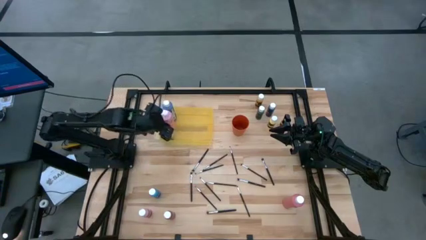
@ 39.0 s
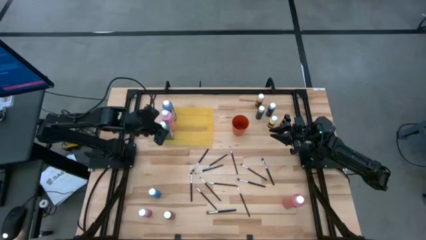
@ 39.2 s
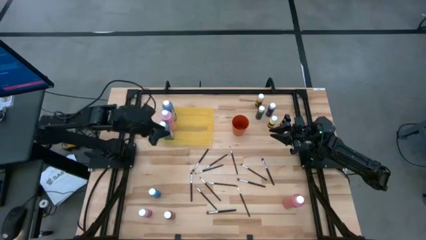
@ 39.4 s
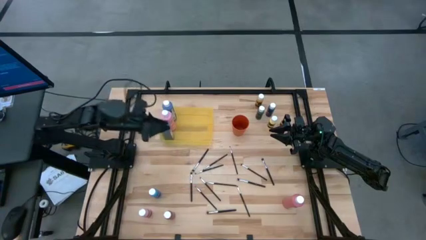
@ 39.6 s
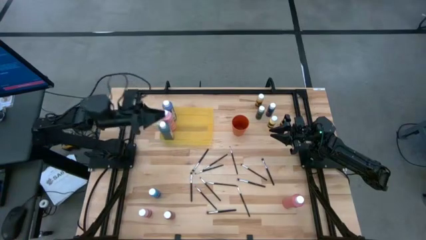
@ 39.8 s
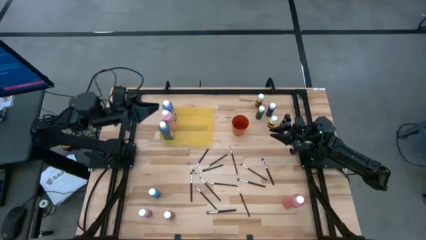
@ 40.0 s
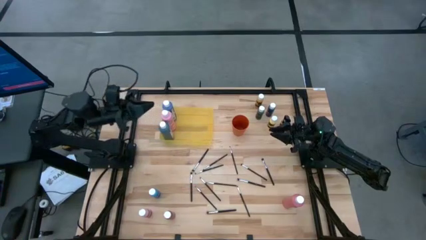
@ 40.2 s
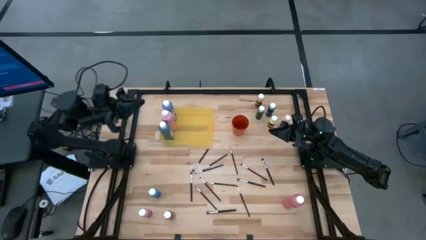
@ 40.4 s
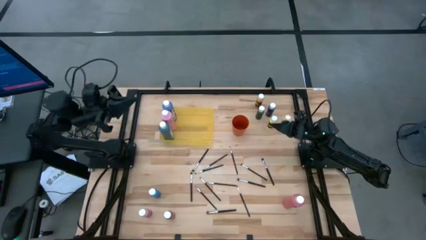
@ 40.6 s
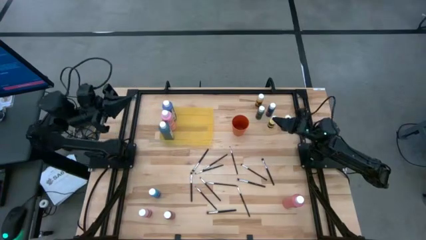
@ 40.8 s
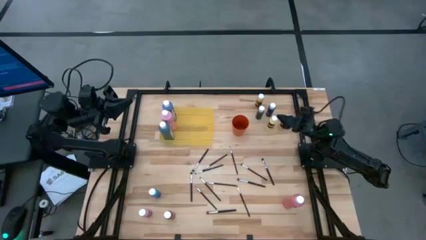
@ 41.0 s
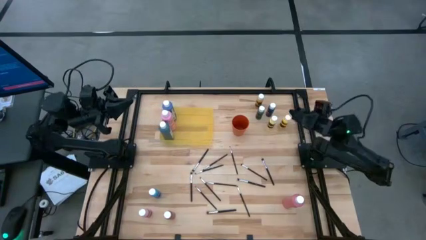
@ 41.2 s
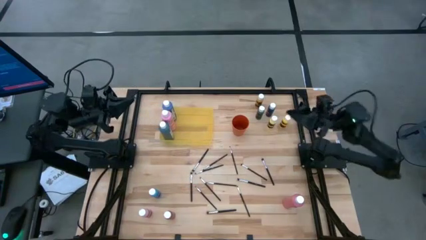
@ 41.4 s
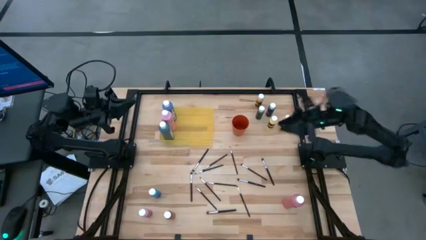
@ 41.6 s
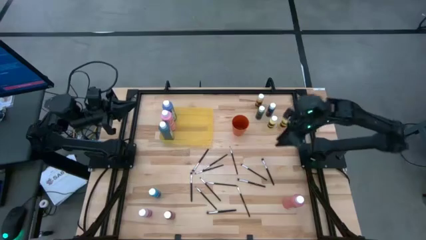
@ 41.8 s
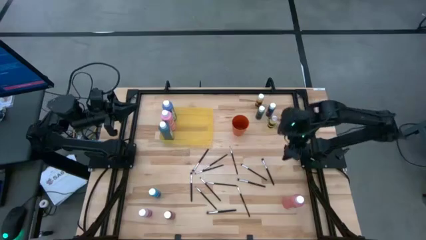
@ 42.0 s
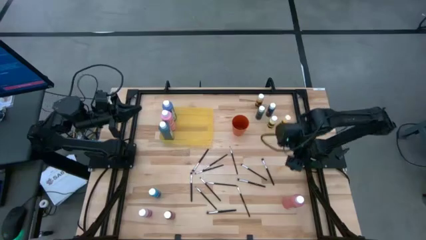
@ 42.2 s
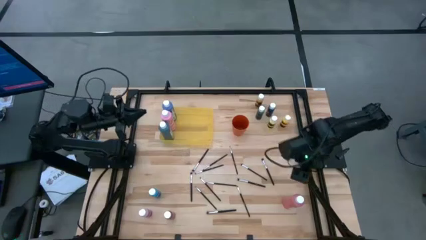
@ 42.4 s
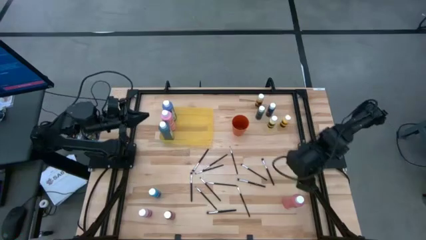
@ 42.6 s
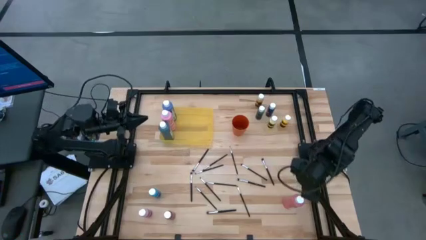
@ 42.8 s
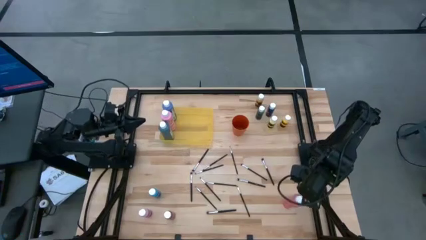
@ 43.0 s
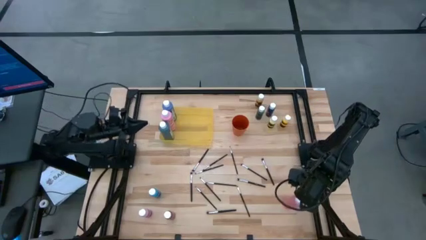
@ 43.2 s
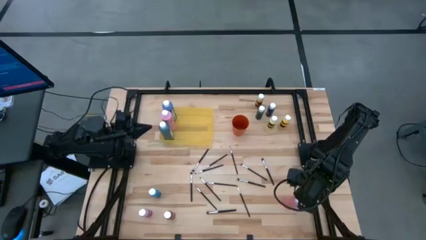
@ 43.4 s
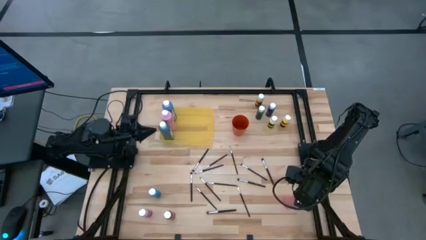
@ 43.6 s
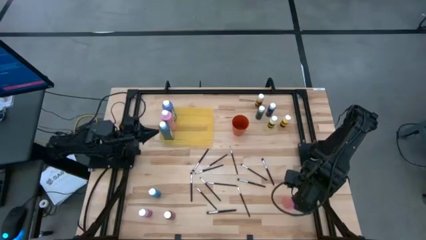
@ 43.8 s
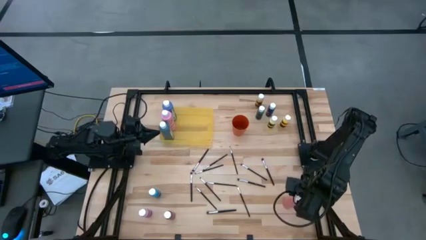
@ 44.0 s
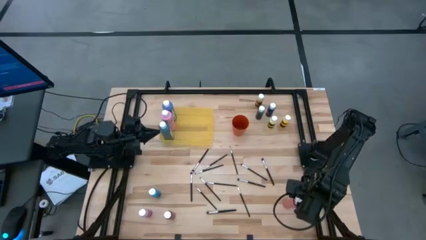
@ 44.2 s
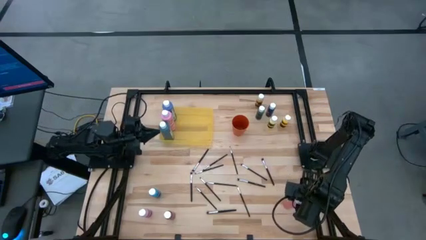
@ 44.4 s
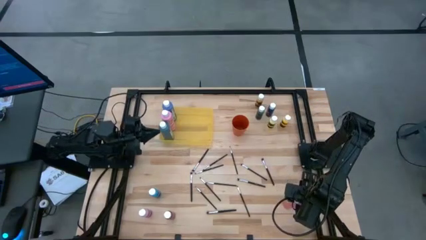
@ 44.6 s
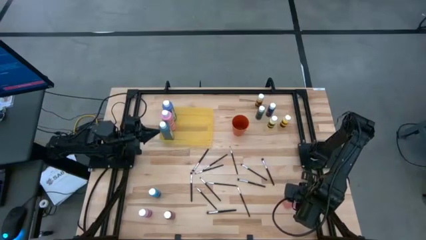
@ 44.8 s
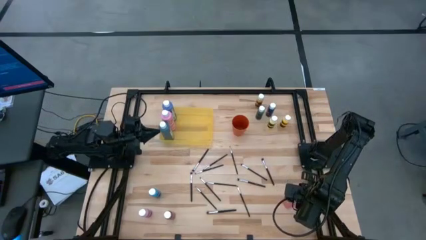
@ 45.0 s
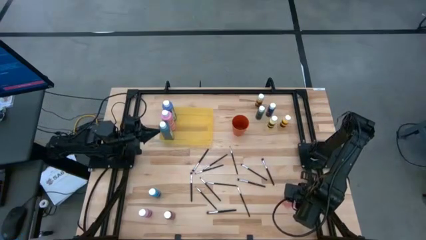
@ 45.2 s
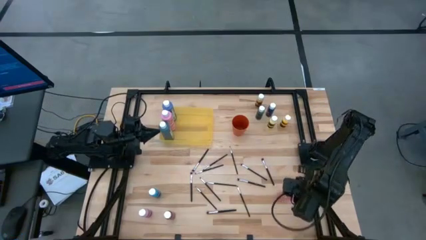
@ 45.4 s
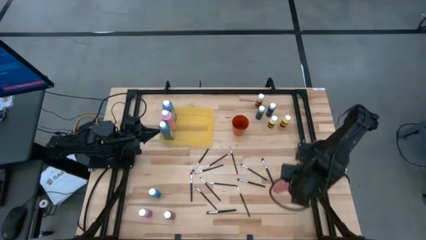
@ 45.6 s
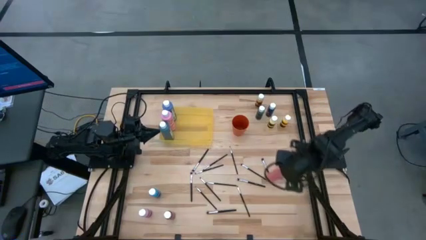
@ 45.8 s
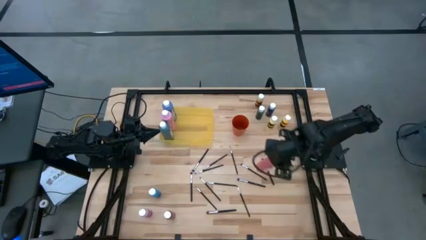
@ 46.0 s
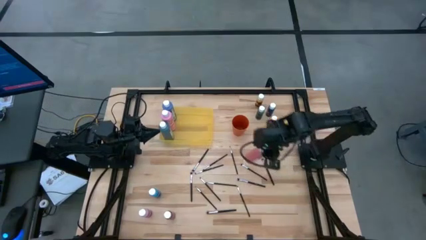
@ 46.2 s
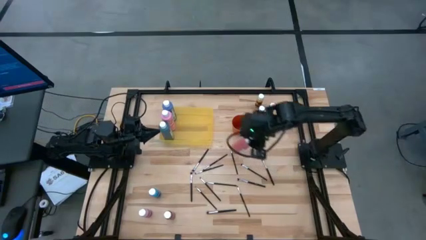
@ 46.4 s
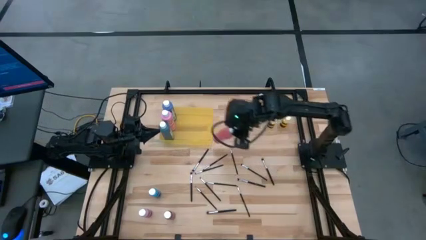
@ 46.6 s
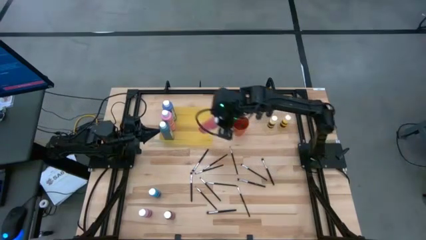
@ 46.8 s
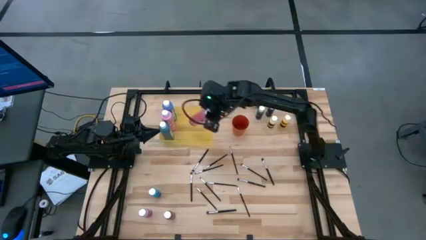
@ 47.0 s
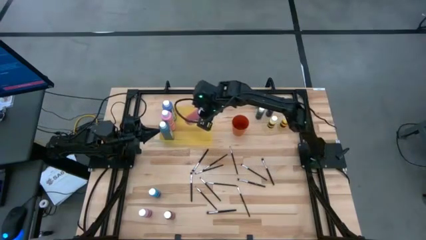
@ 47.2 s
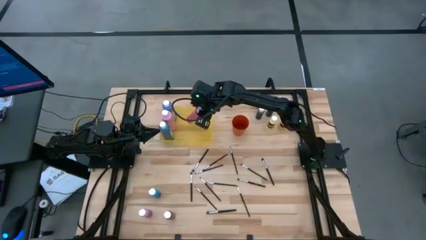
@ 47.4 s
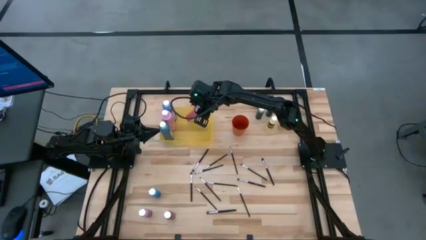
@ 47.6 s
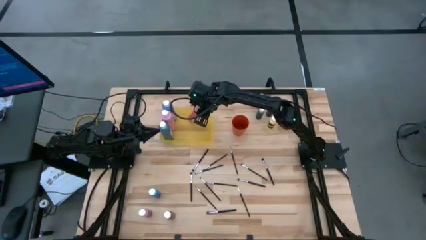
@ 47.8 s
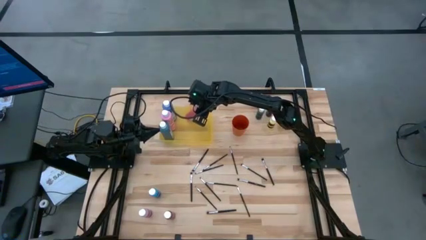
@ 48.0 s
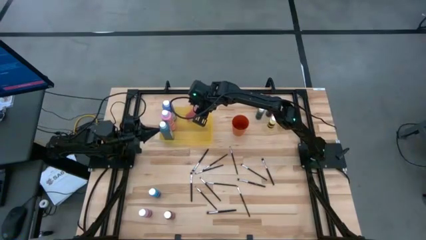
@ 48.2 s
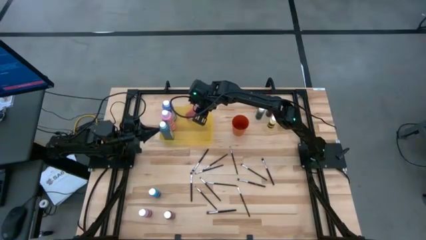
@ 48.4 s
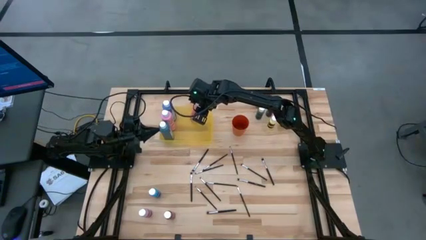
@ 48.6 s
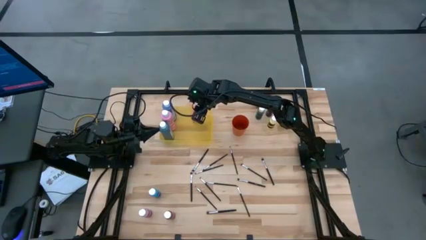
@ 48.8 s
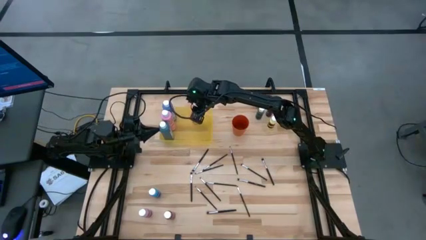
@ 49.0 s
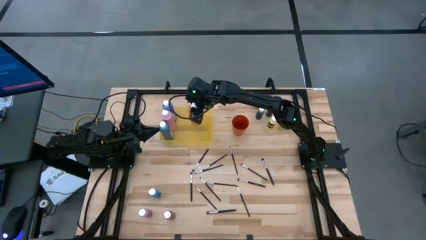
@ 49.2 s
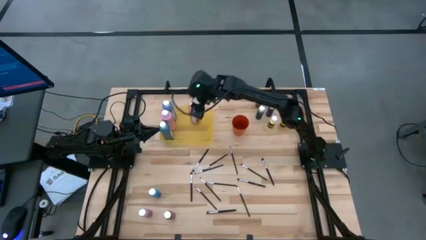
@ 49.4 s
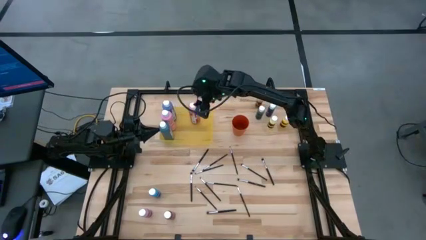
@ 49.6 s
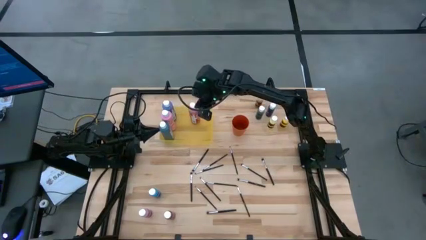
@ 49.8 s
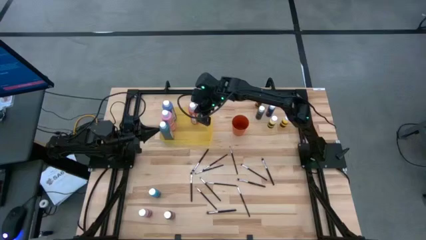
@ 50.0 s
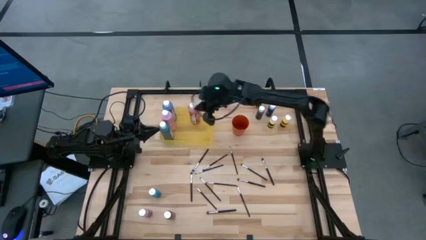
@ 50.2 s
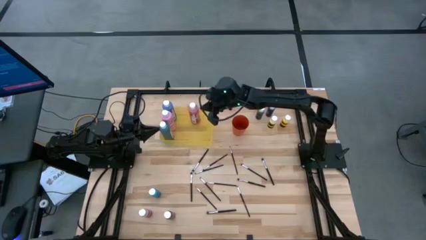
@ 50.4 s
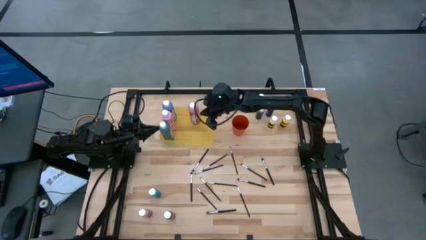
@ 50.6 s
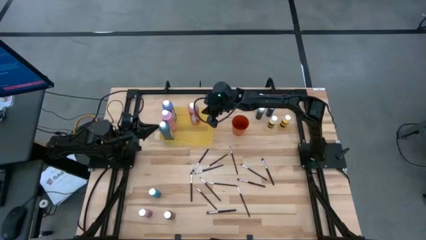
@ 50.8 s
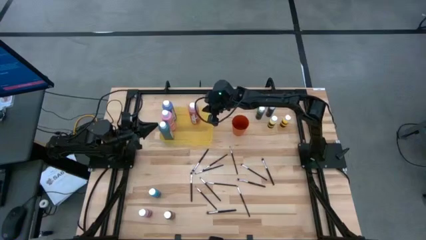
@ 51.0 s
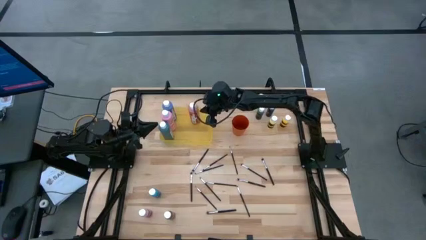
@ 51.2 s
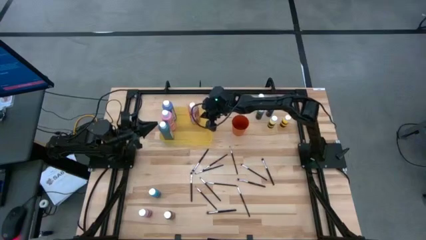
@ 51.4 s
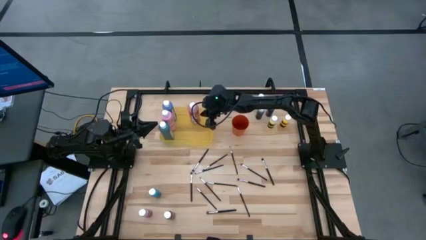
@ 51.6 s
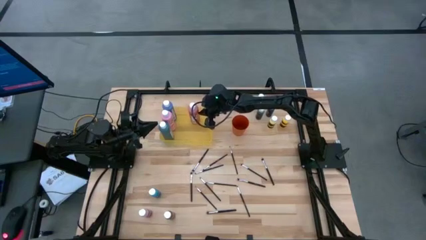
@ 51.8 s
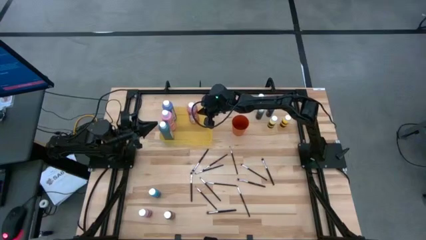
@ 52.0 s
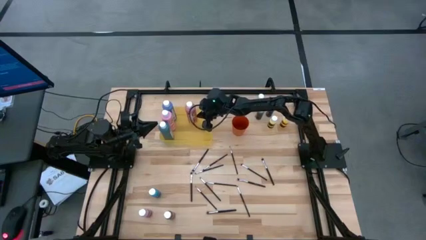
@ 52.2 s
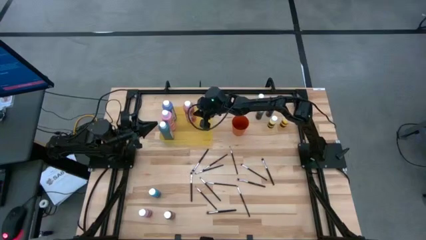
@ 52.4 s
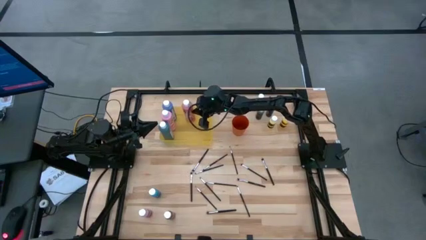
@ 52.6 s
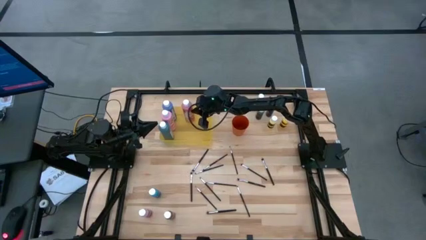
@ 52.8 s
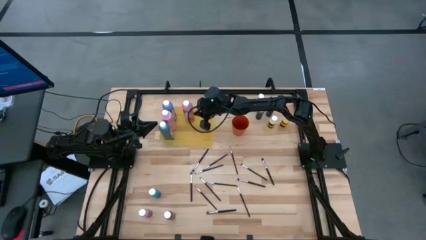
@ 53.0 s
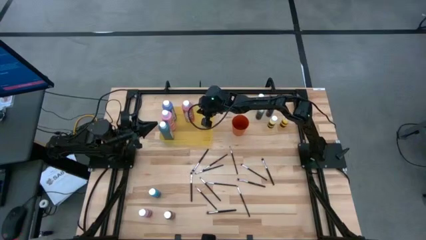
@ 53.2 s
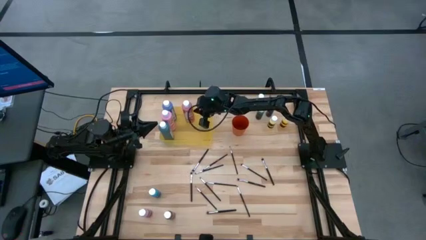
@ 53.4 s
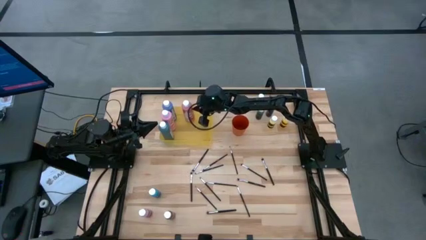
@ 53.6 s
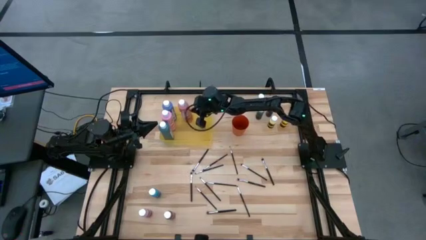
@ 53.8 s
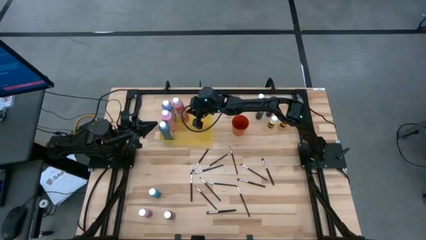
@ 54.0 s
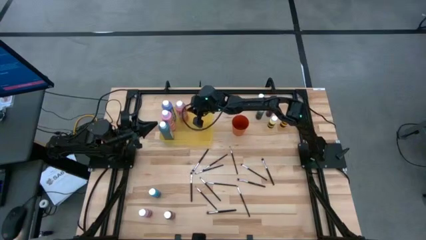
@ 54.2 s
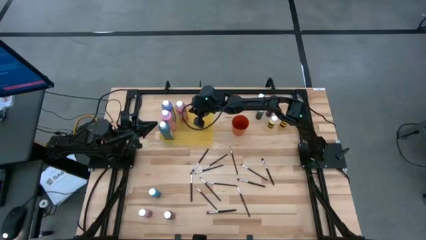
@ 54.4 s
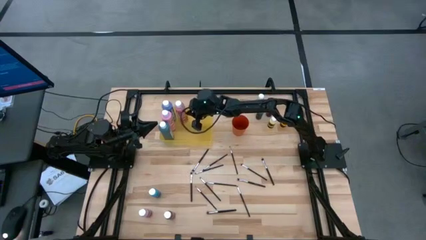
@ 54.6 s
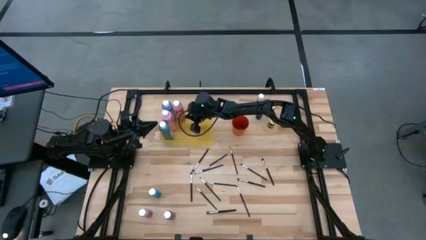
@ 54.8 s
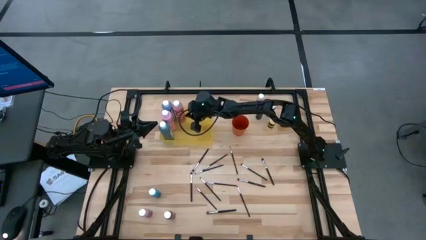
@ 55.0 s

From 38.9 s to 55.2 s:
Task: Pick & Place Paint Supplies
Put the pink bottle into the yellow bin
